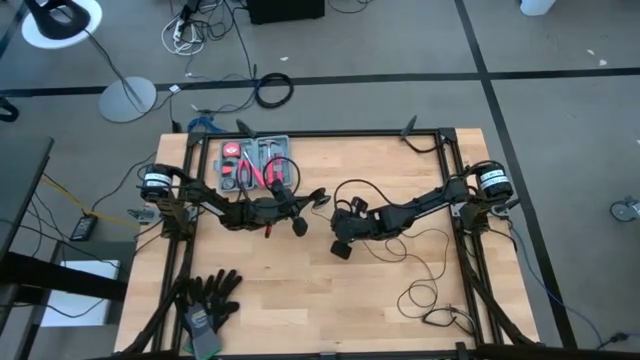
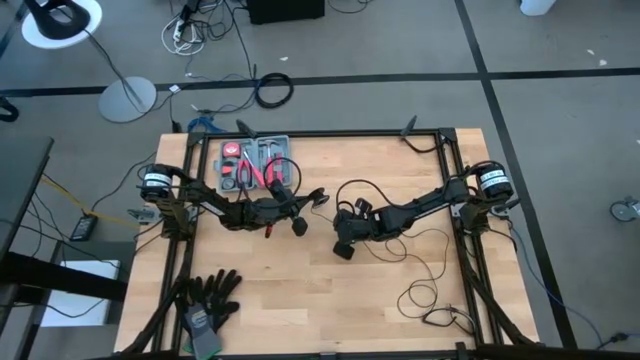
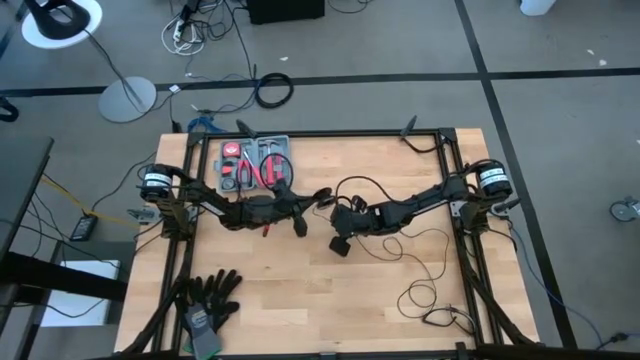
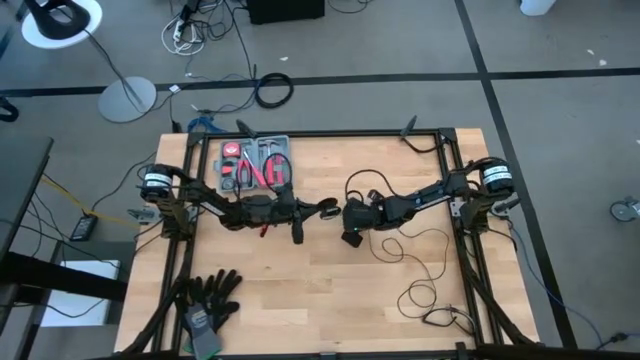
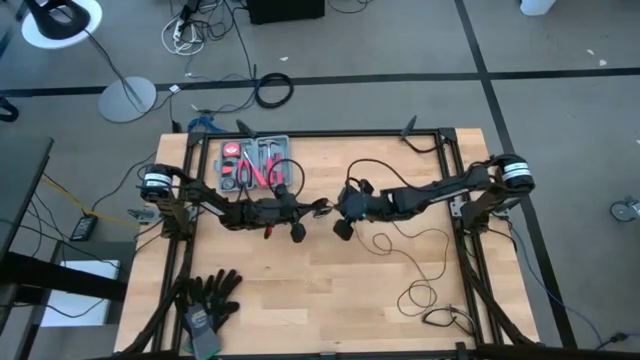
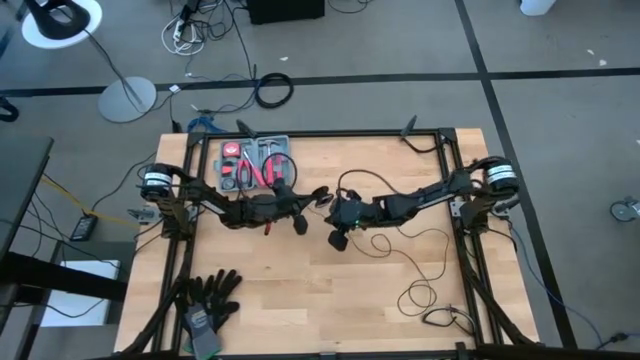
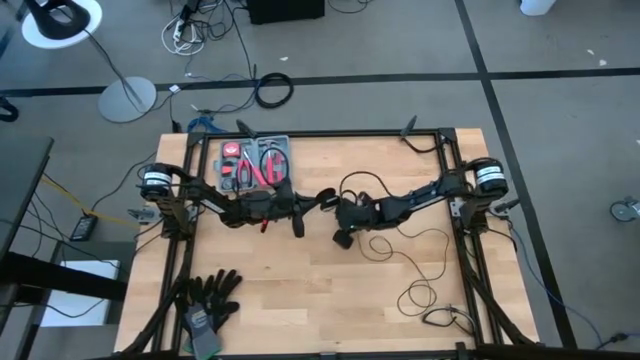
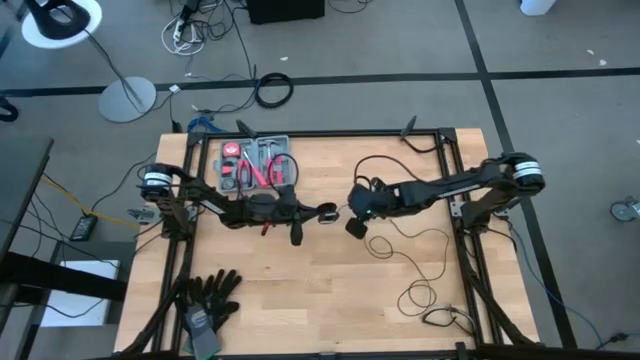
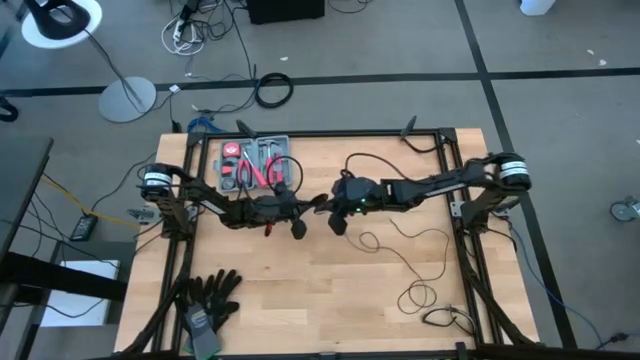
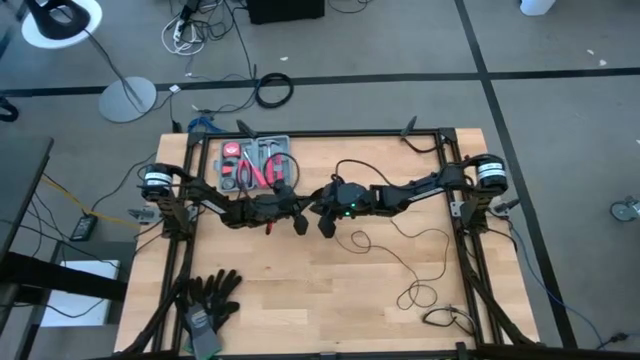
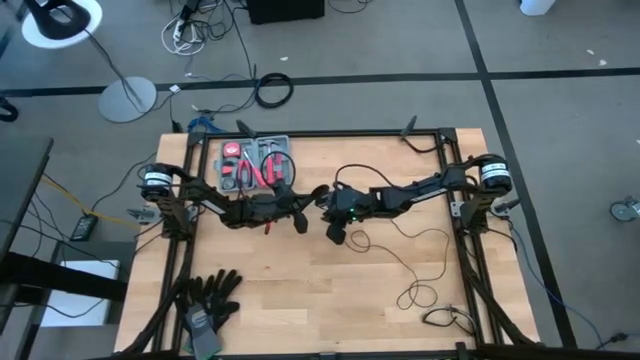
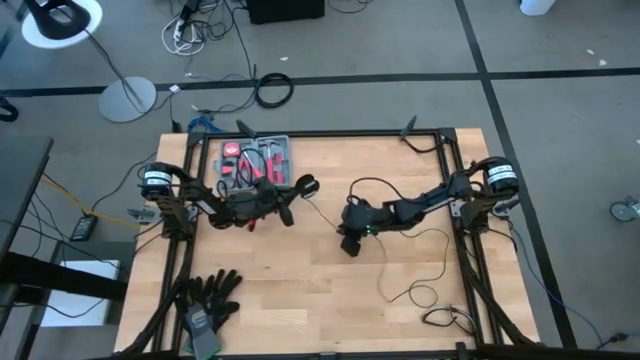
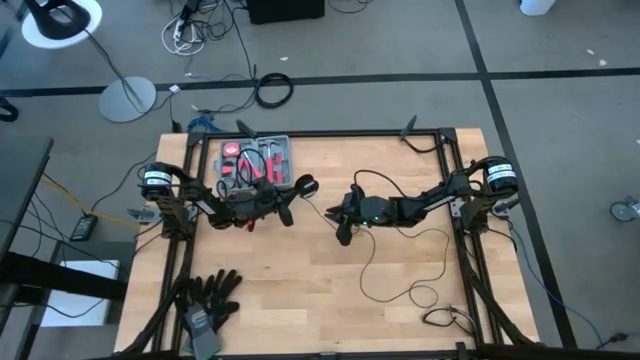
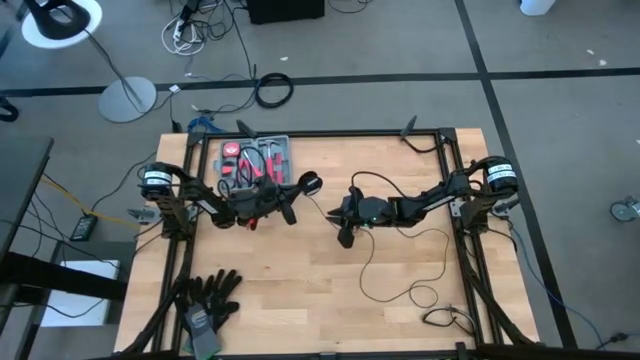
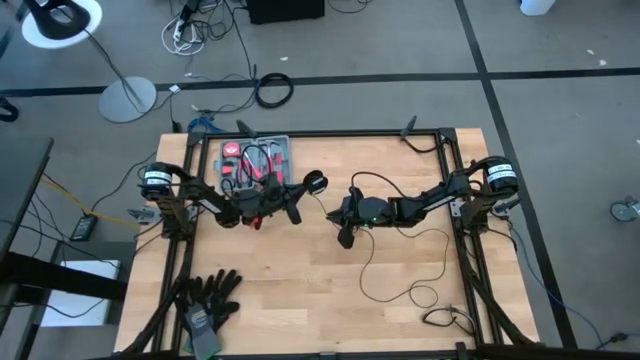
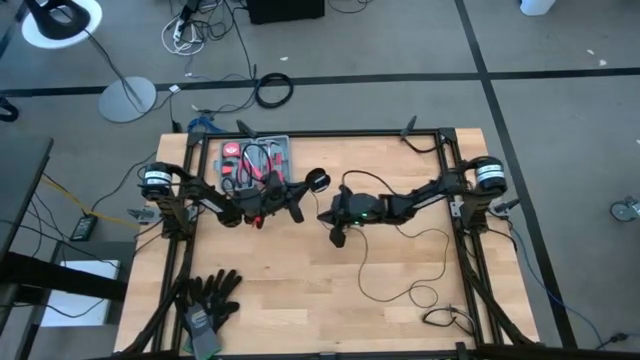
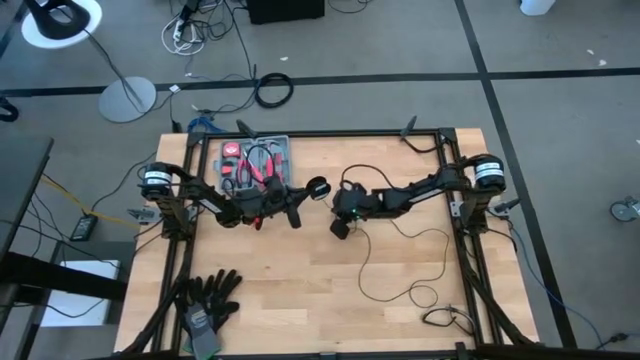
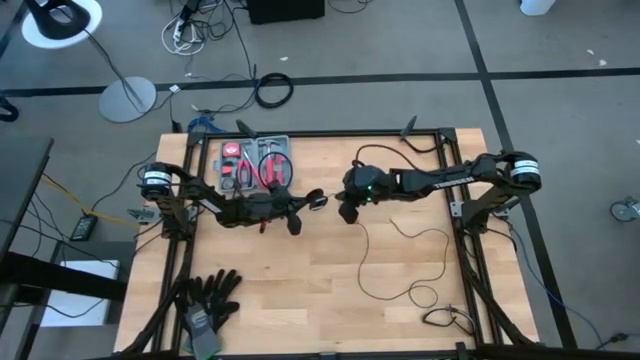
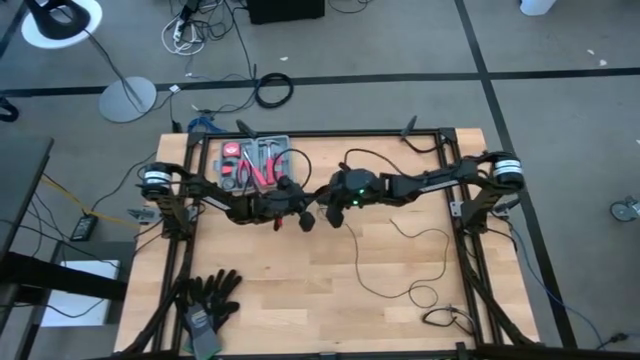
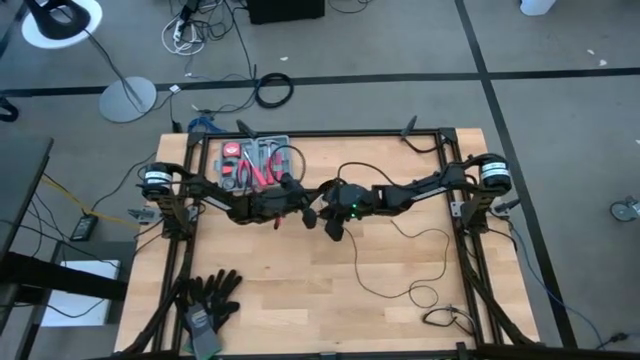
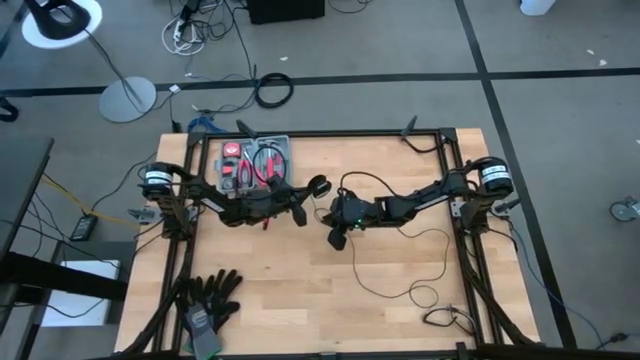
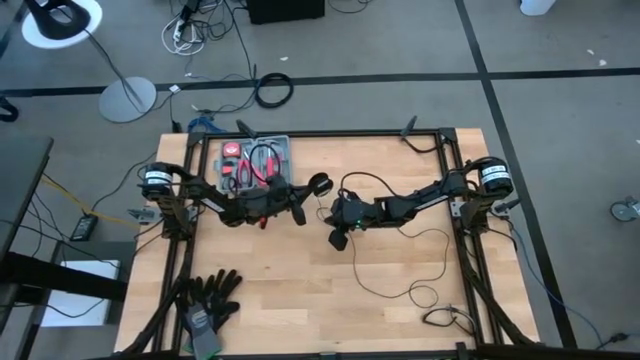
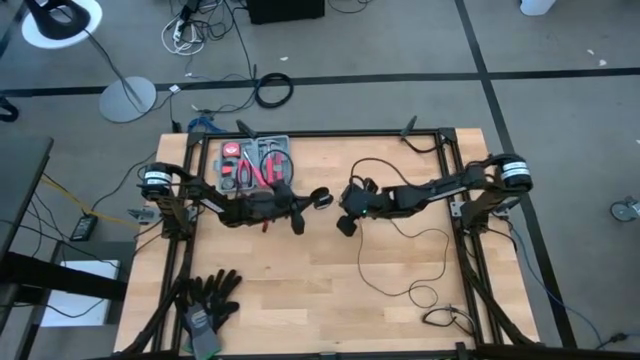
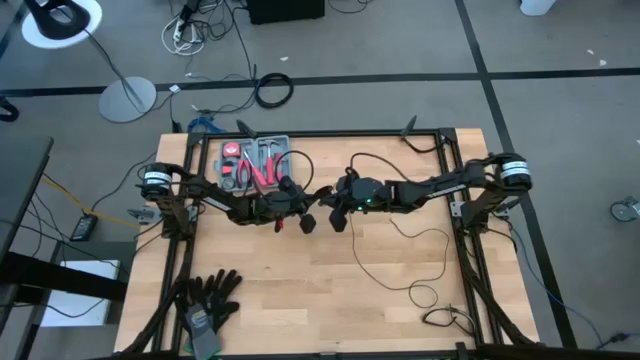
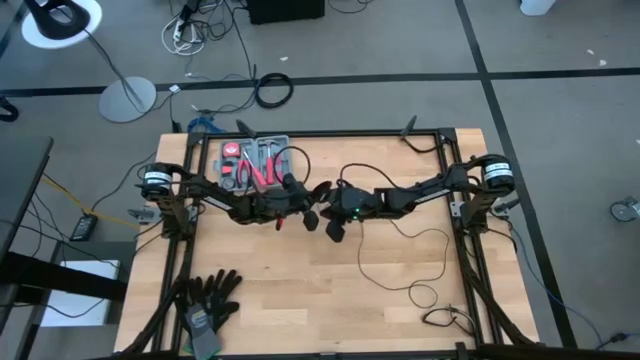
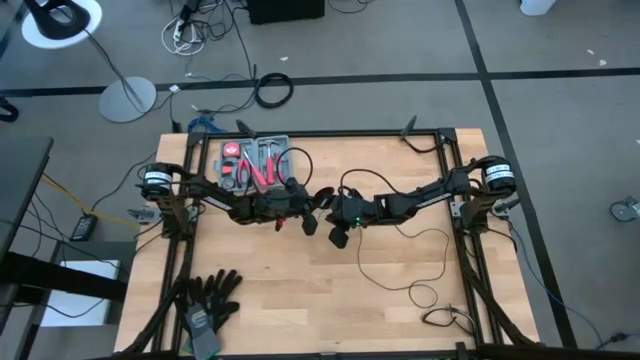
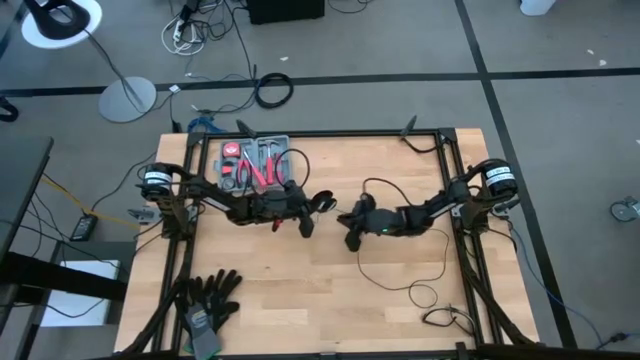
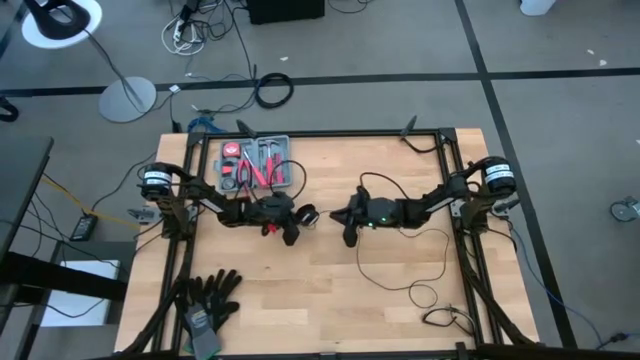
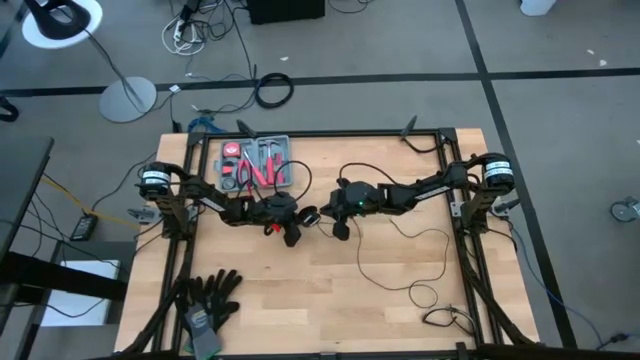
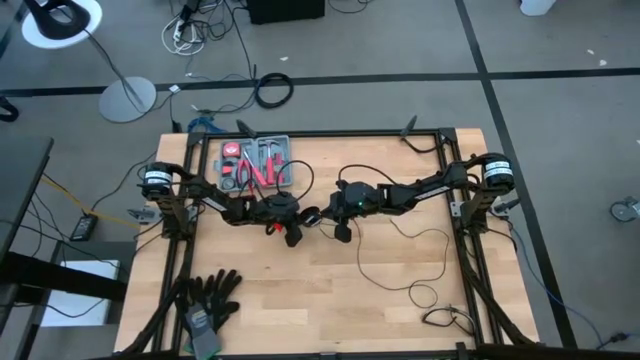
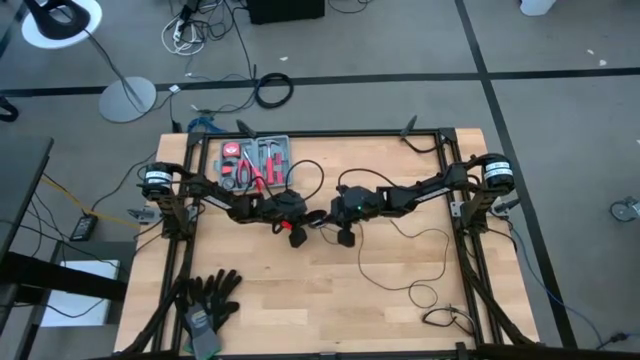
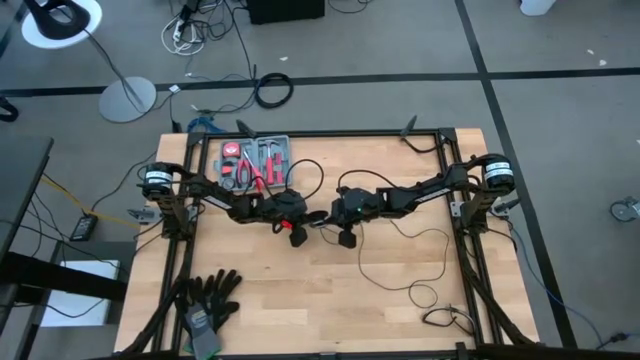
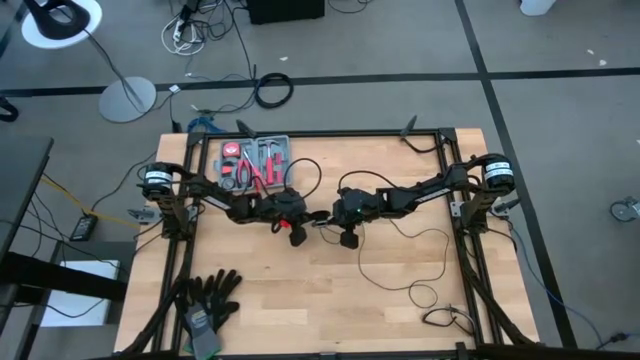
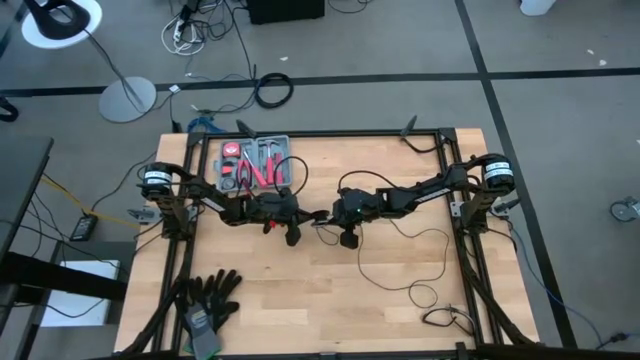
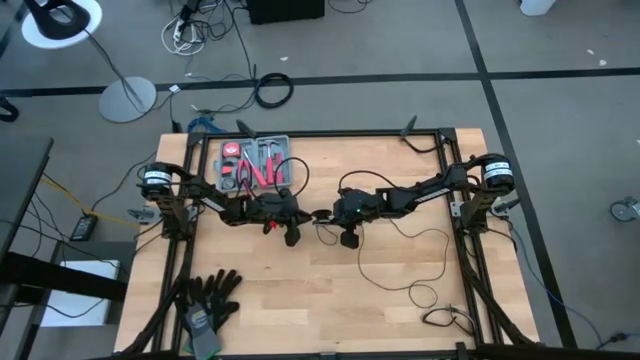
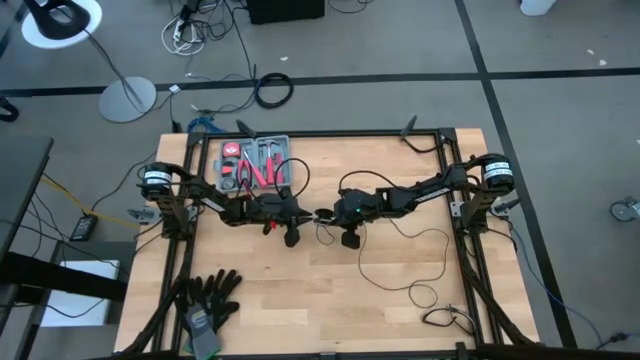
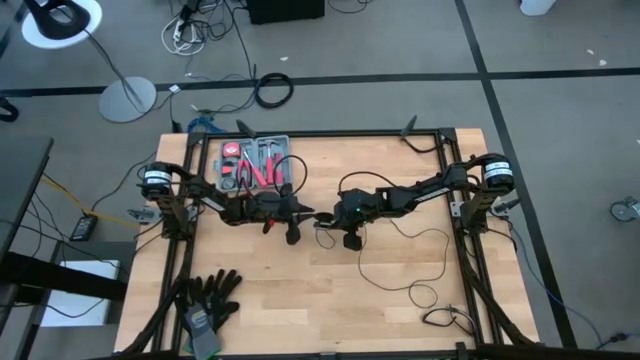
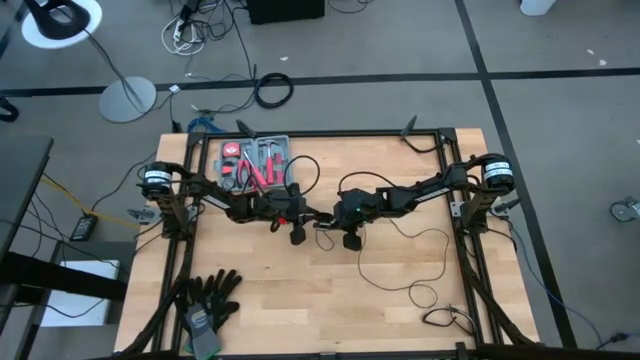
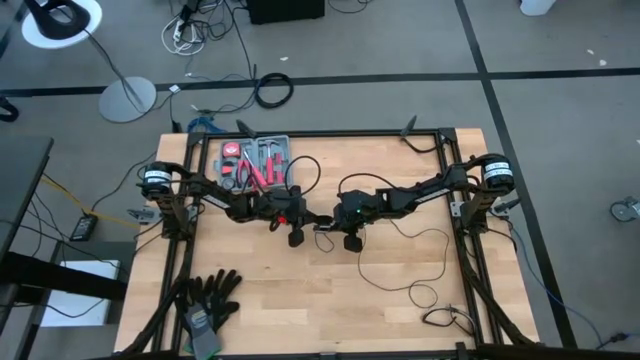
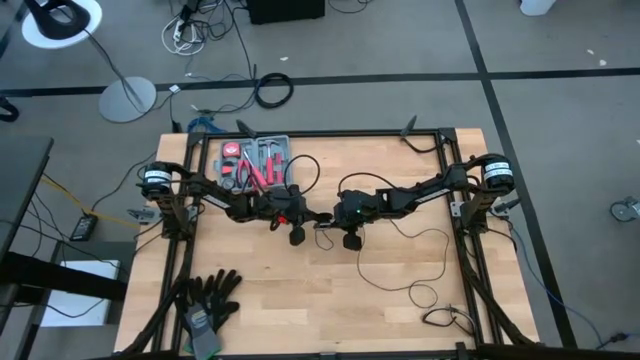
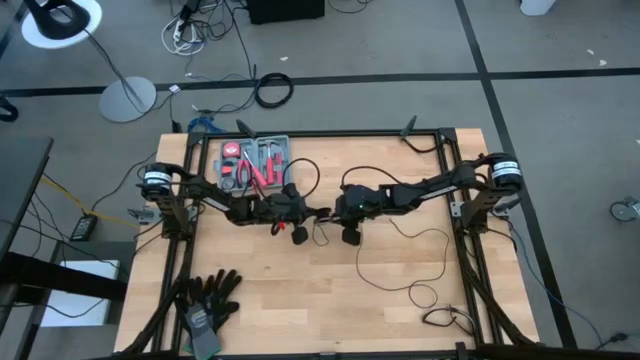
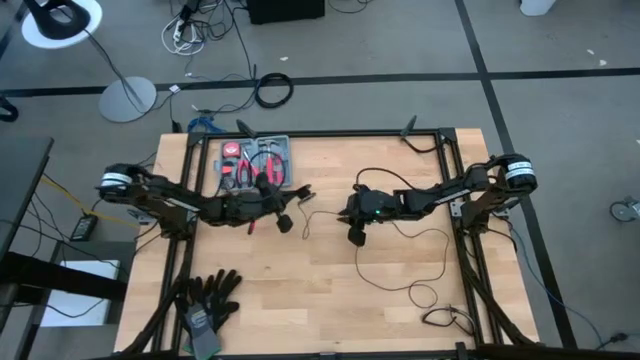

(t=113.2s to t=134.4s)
Task: Coil cords
Coil the black cable wire on the spool
